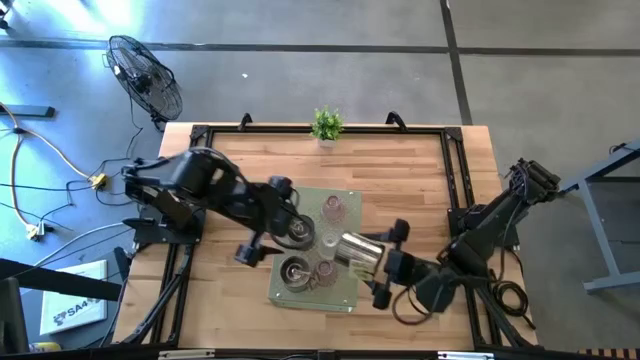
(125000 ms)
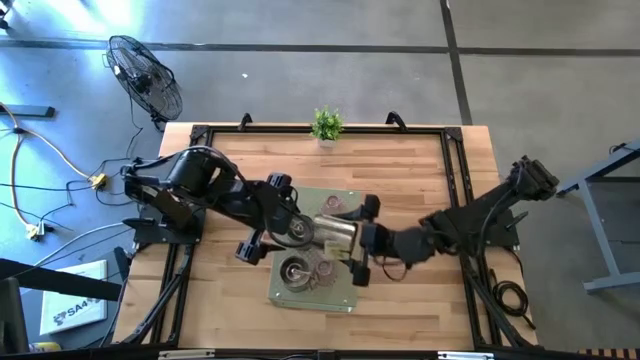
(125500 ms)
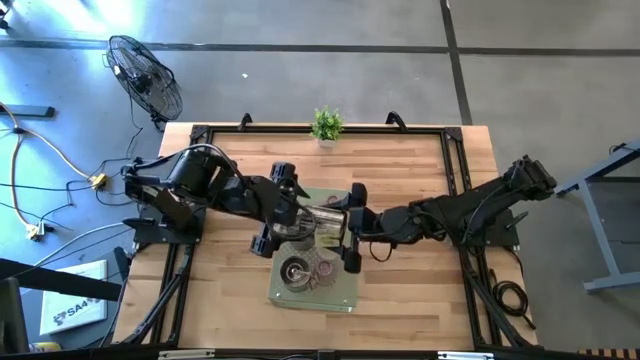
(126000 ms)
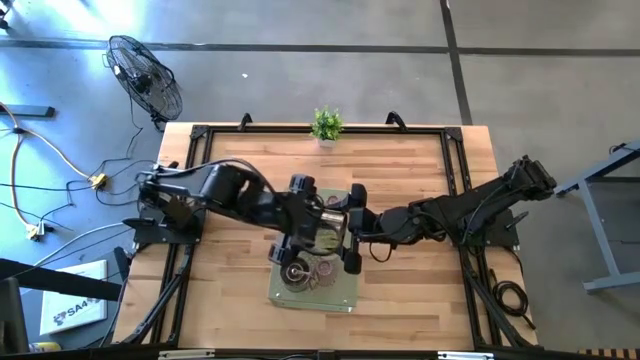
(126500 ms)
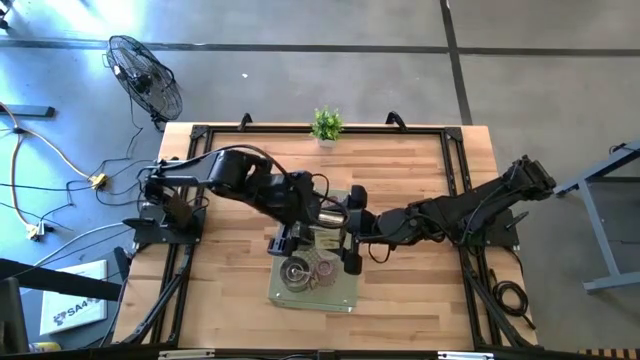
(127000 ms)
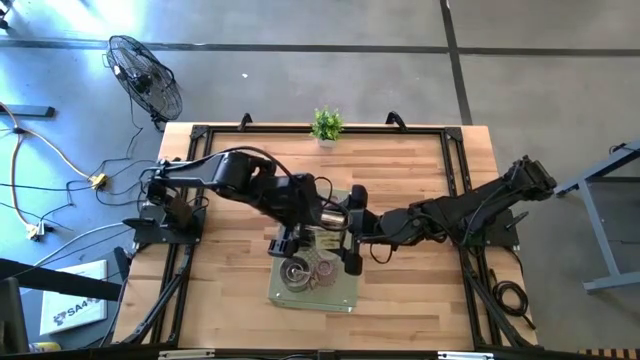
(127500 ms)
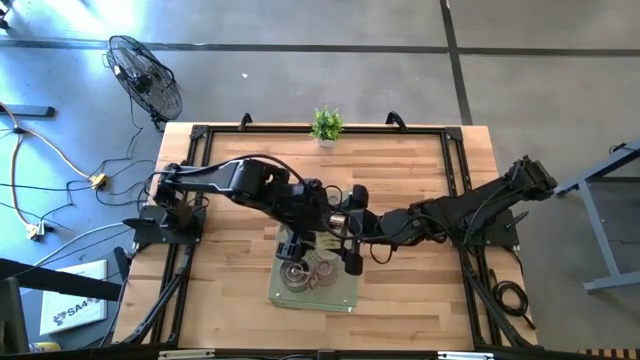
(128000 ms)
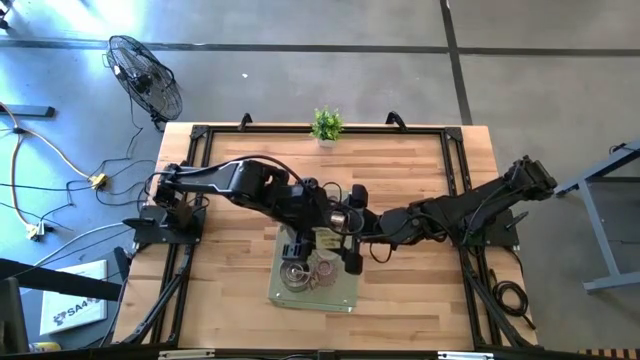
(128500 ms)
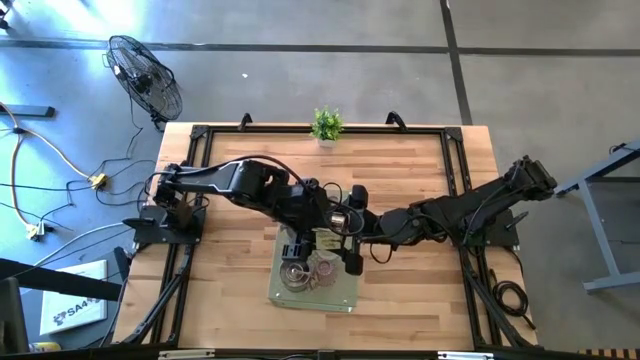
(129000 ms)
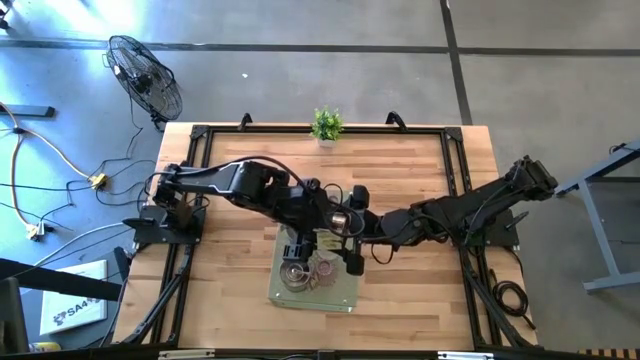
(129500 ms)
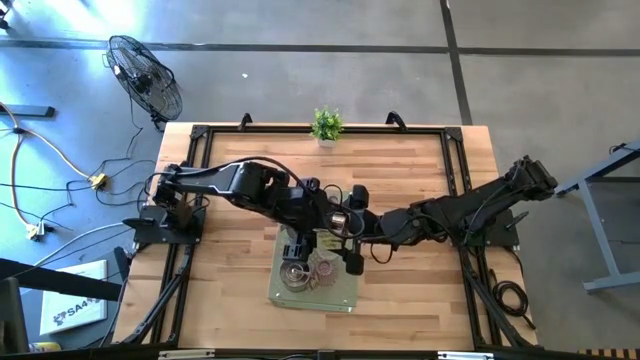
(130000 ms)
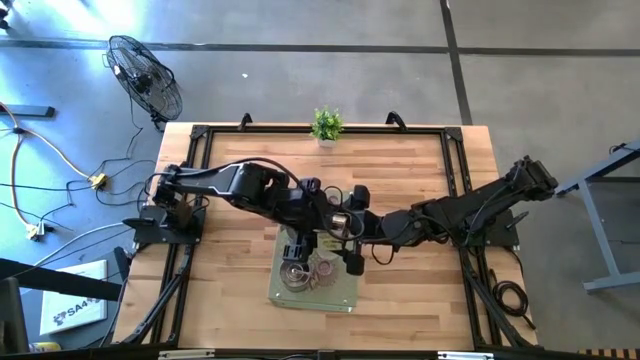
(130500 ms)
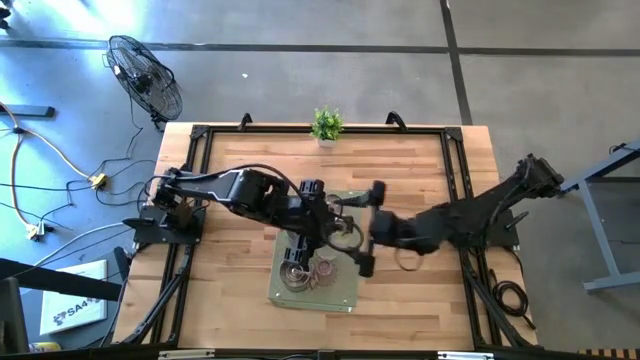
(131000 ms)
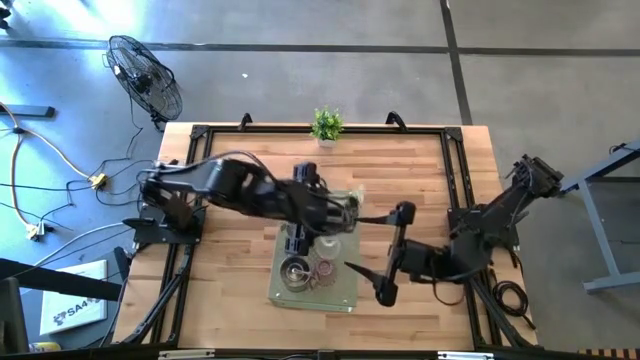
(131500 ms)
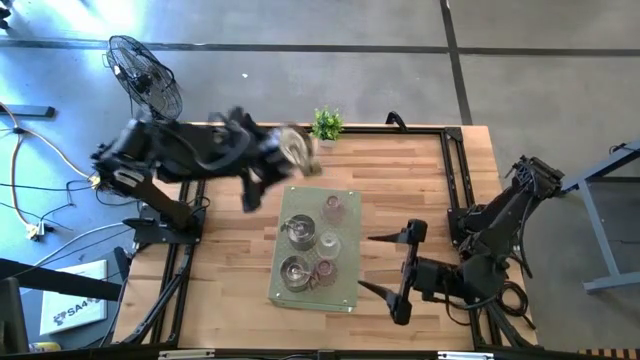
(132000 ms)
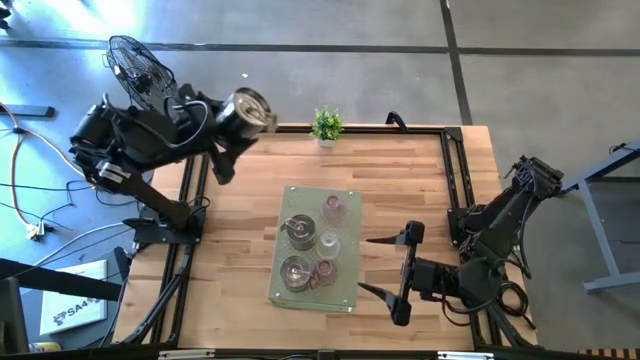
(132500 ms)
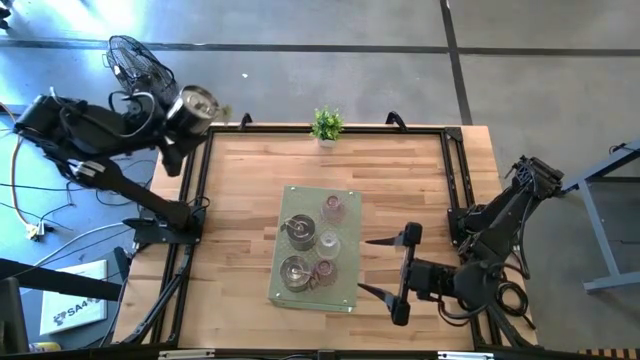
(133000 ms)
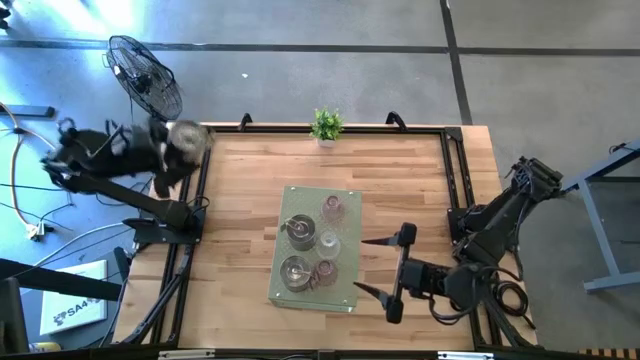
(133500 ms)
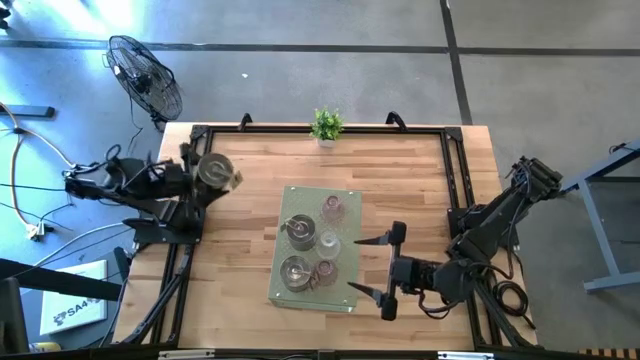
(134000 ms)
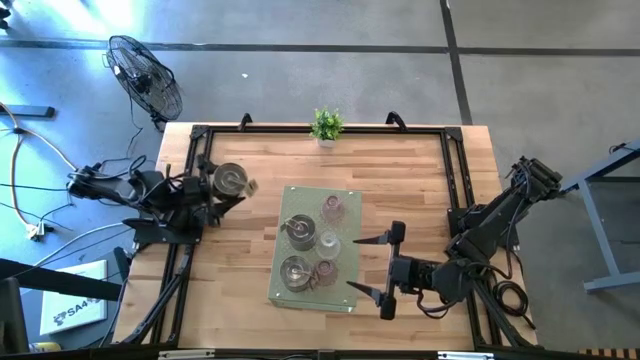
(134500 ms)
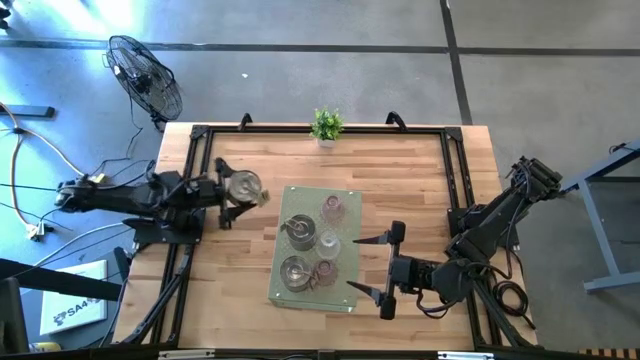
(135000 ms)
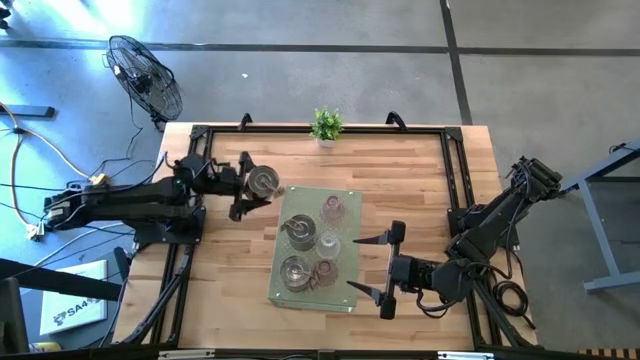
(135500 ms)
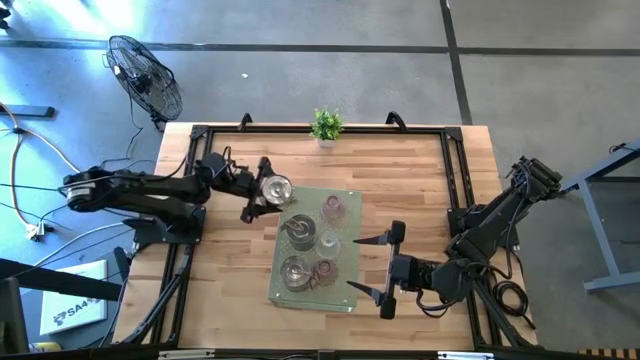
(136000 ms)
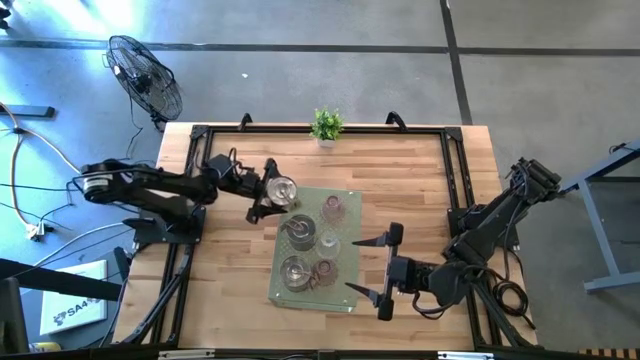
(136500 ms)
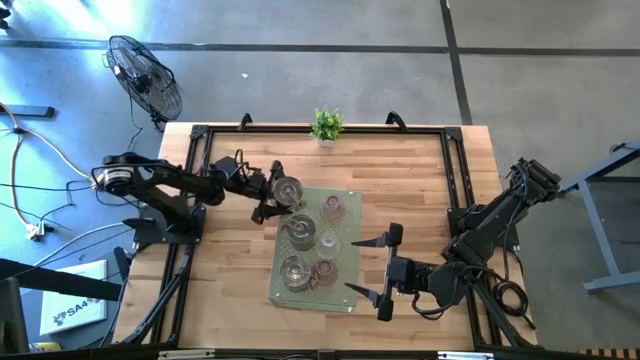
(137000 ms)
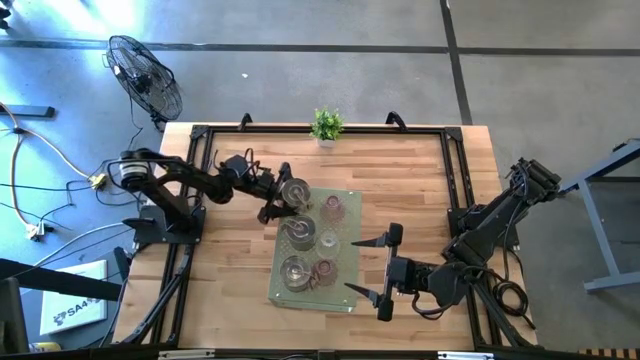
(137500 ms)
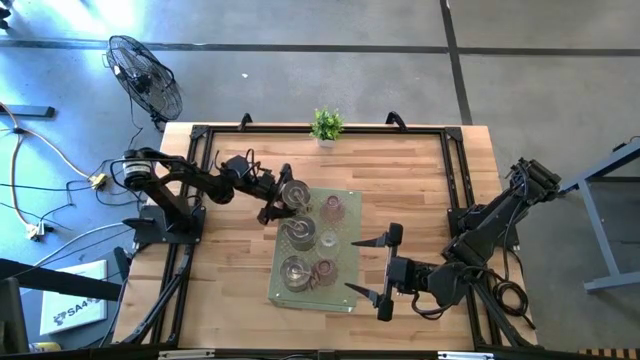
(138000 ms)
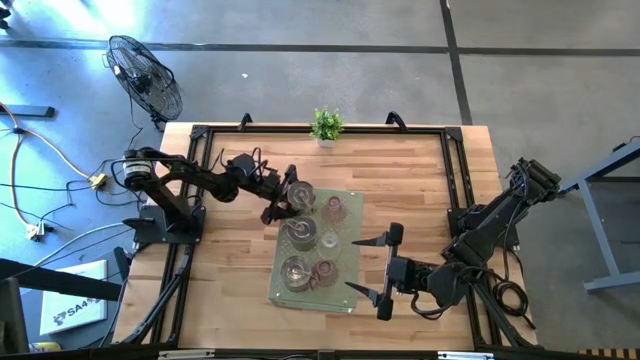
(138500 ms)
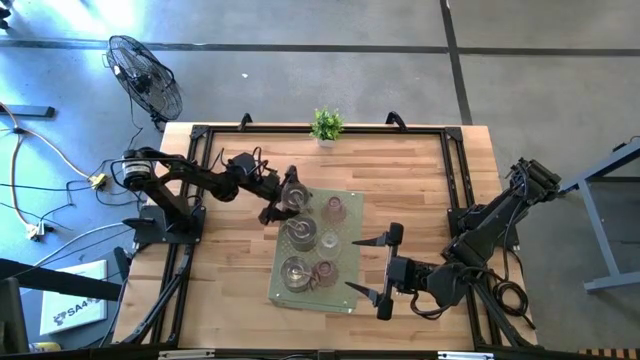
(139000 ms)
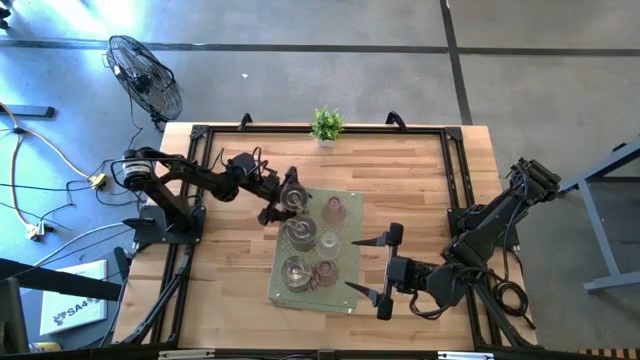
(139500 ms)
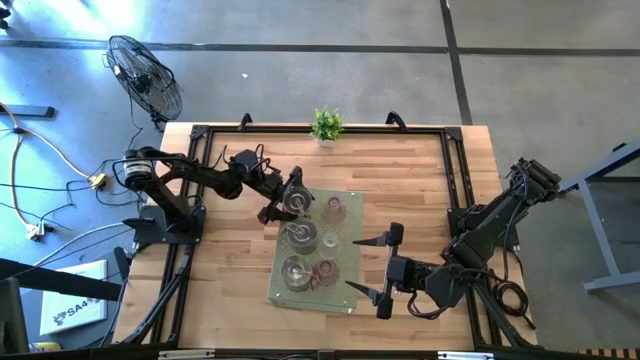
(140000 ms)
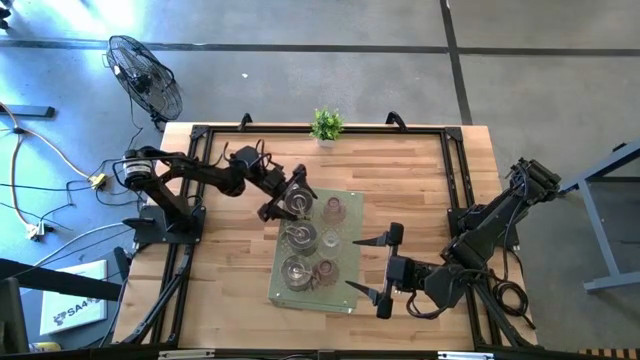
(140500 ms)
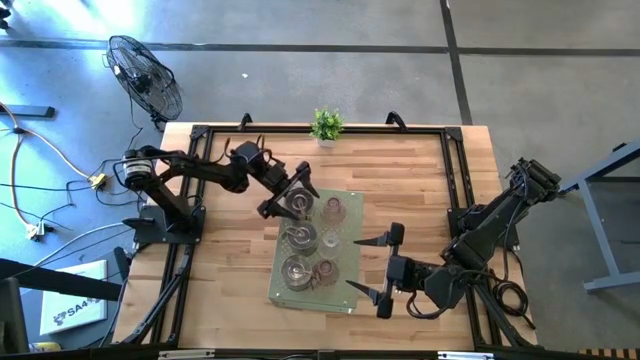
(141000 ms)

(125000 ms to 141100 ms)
Task: Pick & Place candle stick holders
Put the green scented candle on the shelf aligned with the purple candle holder

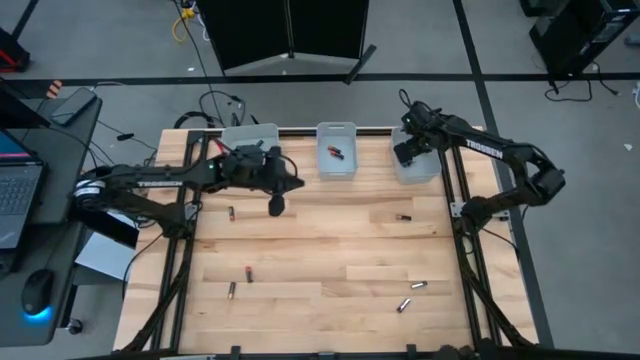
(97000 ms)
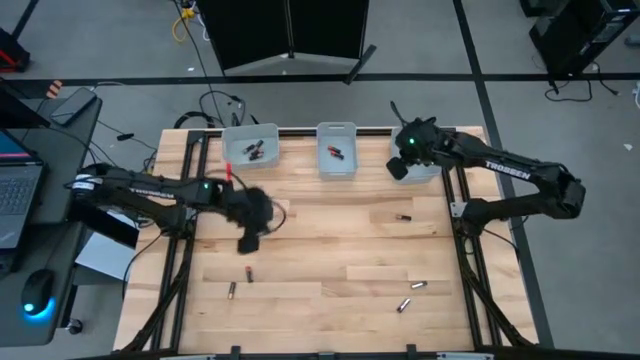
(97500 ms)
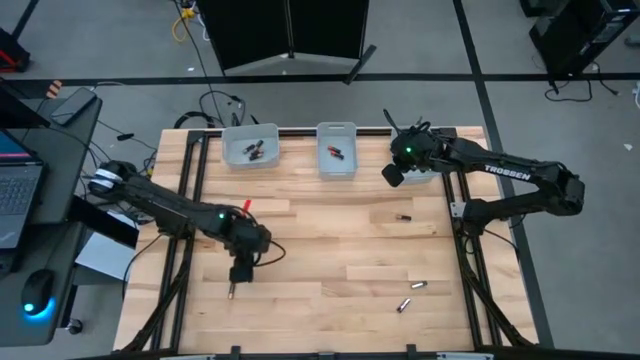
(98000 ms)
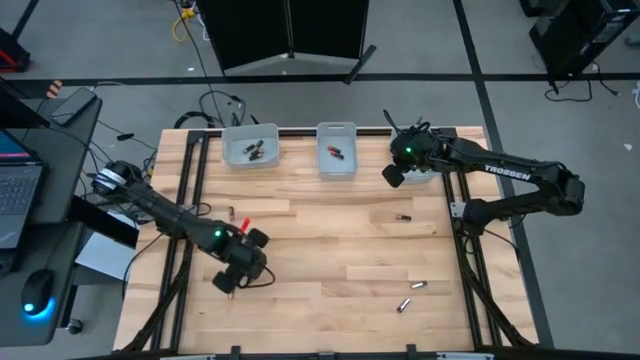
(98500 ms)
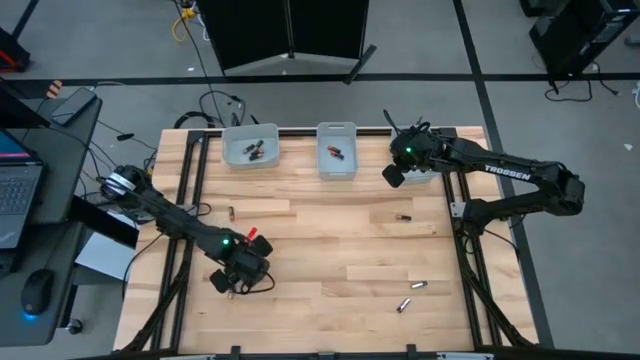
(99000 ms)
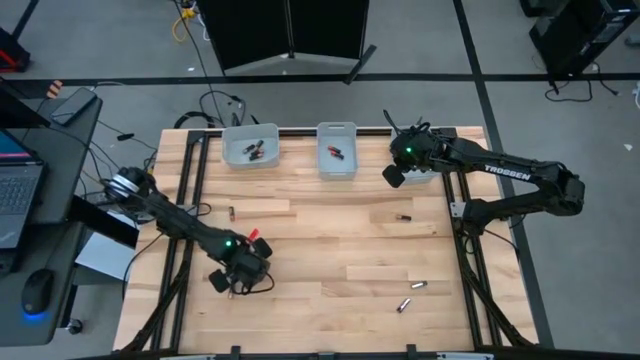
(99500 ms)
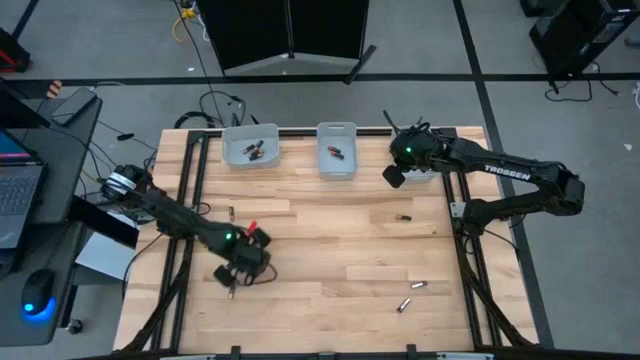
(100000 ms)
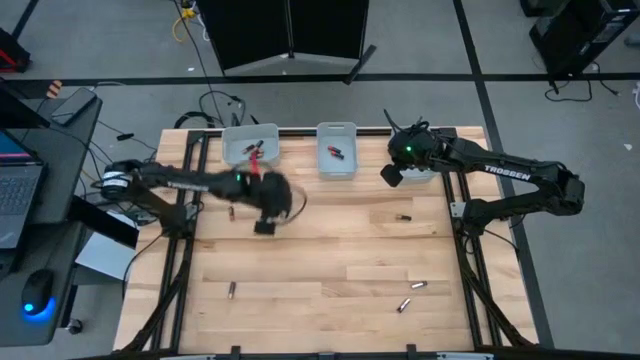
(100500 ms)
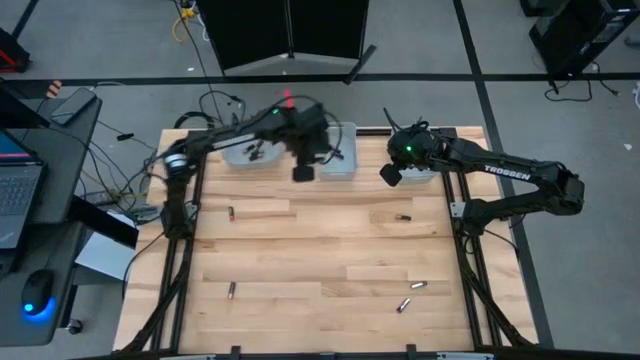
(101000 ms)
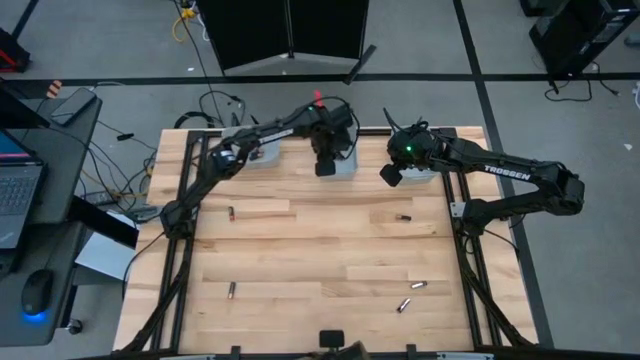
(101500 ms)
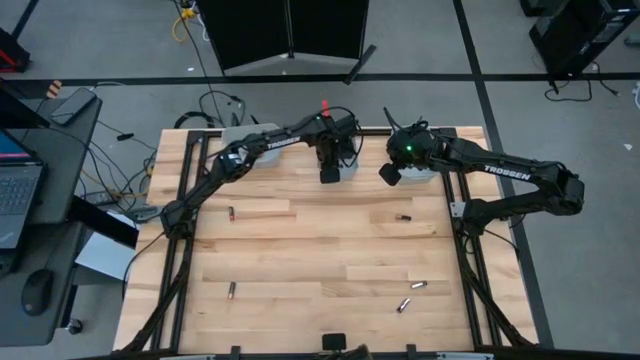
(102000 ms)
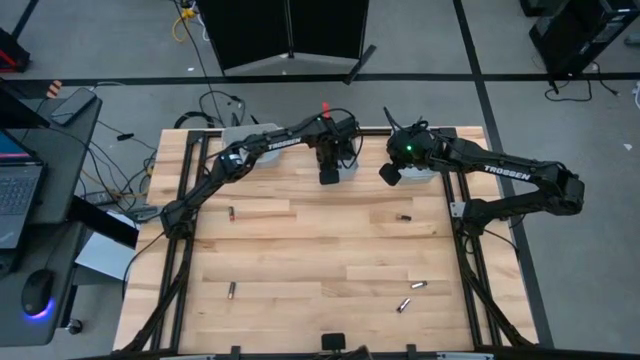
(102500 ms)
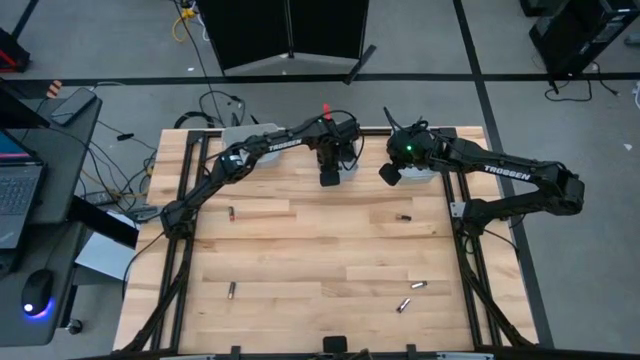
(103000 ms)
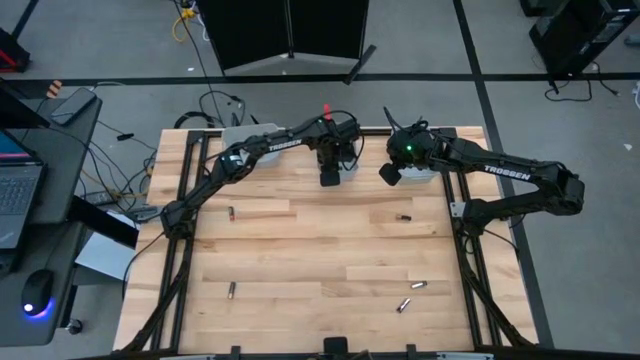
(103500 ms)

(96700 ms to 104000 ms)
Task: Sort batteries
Put the bottom black orange battery into the middle bin
